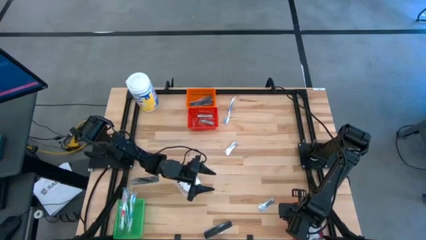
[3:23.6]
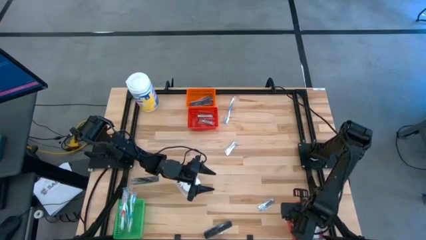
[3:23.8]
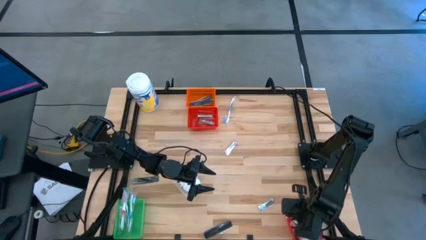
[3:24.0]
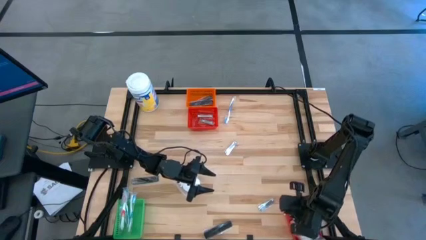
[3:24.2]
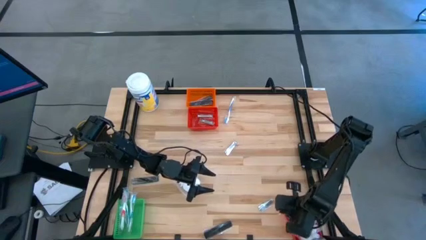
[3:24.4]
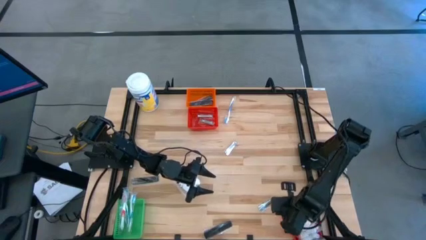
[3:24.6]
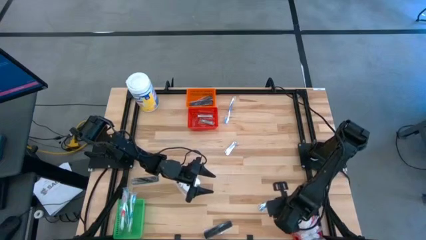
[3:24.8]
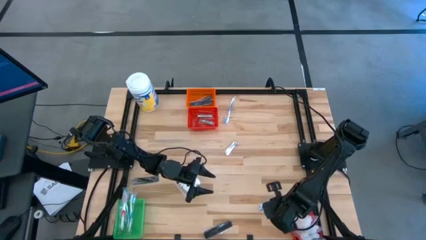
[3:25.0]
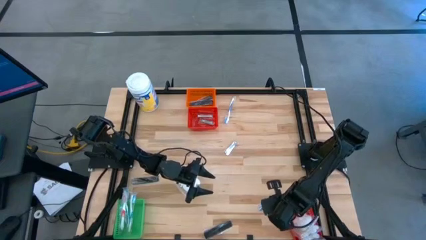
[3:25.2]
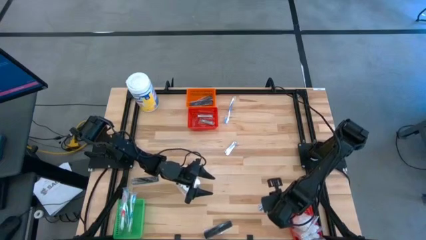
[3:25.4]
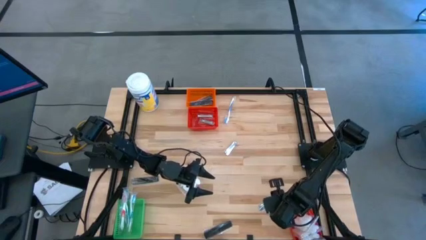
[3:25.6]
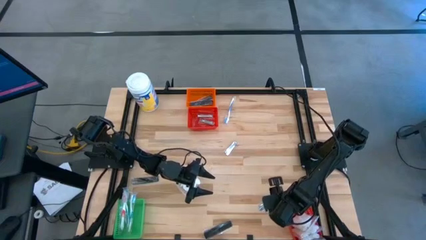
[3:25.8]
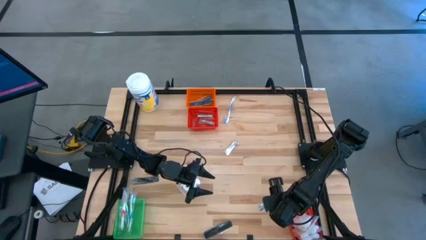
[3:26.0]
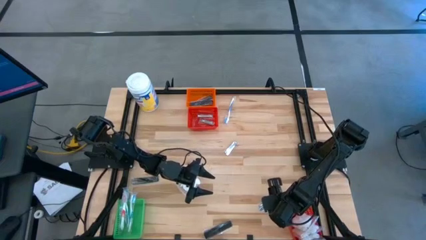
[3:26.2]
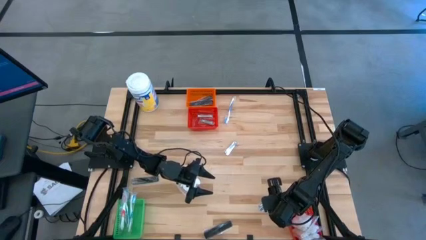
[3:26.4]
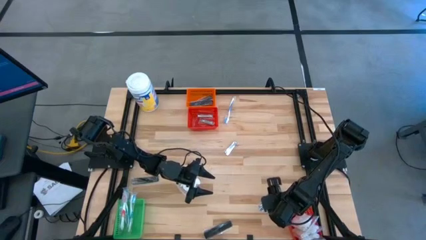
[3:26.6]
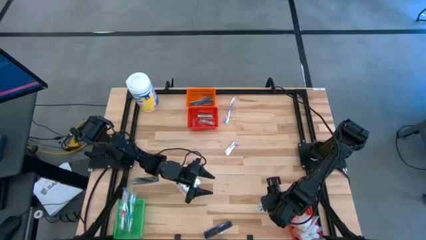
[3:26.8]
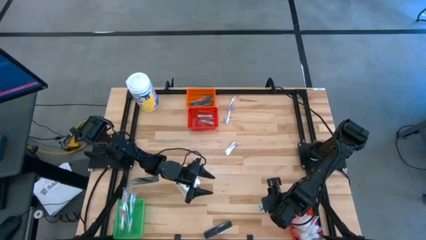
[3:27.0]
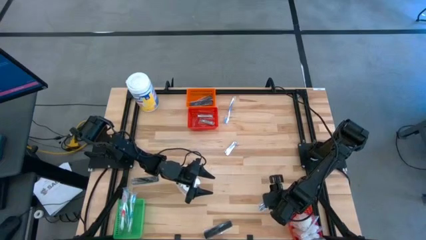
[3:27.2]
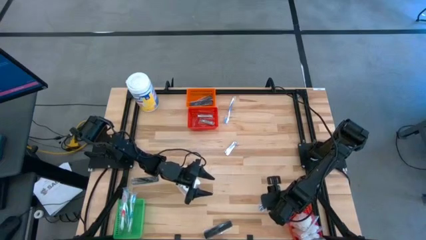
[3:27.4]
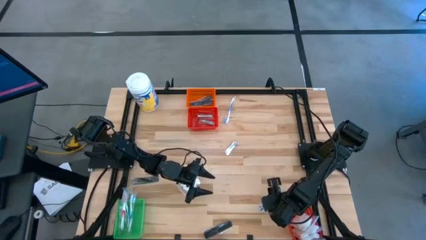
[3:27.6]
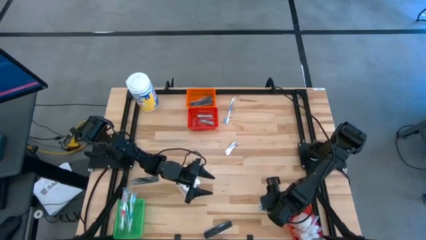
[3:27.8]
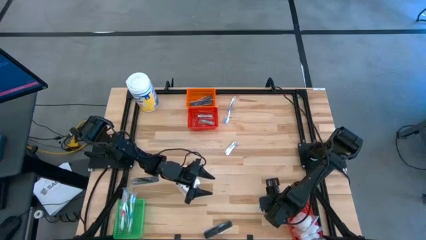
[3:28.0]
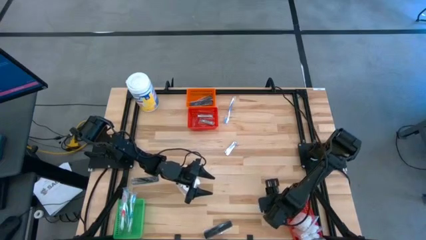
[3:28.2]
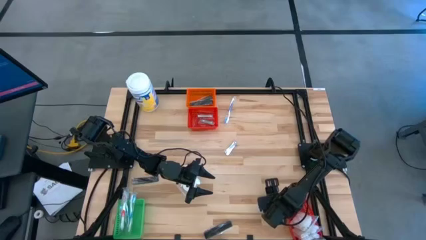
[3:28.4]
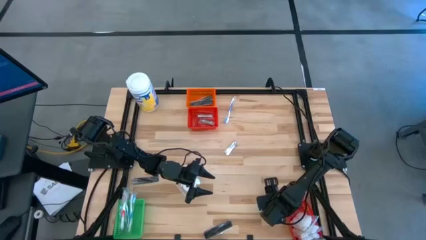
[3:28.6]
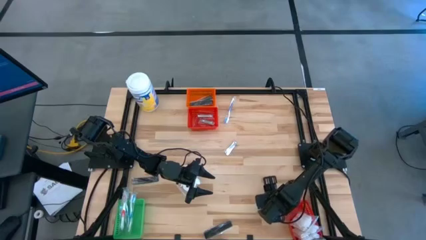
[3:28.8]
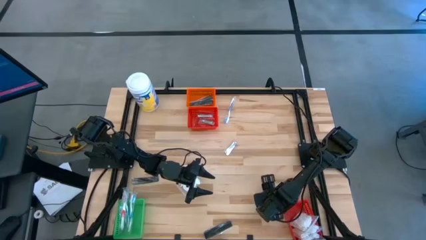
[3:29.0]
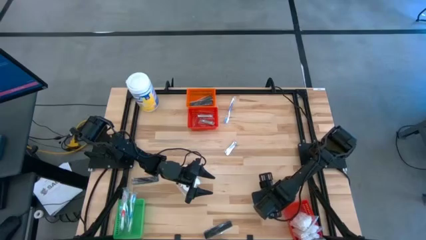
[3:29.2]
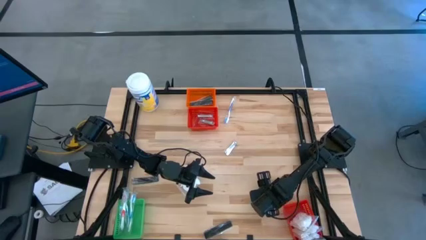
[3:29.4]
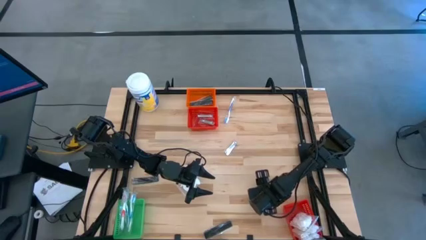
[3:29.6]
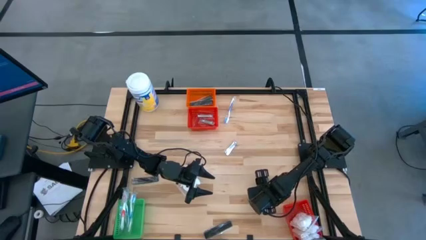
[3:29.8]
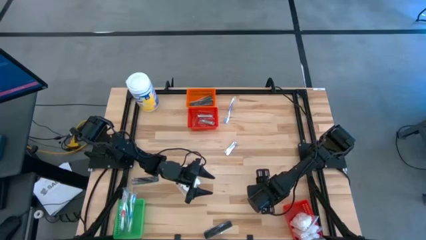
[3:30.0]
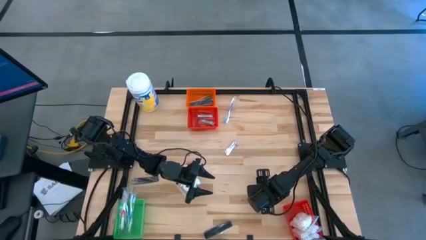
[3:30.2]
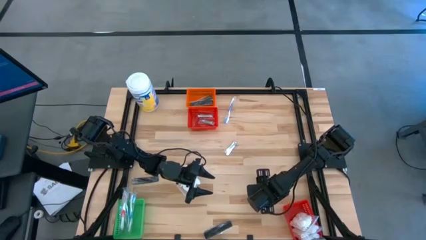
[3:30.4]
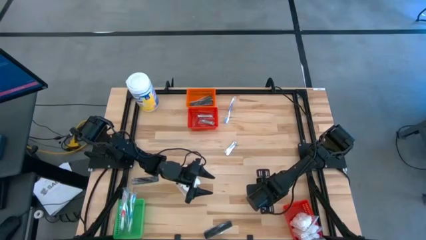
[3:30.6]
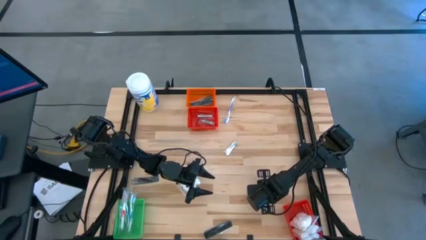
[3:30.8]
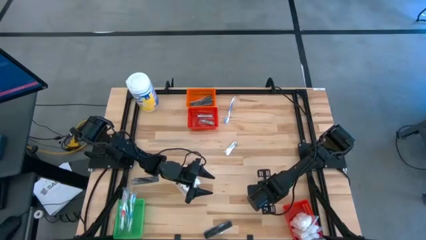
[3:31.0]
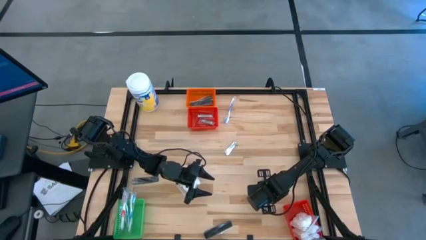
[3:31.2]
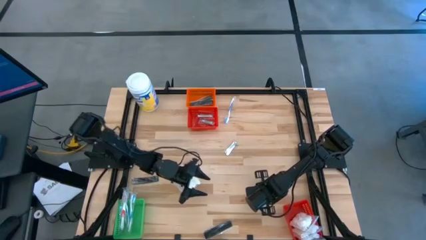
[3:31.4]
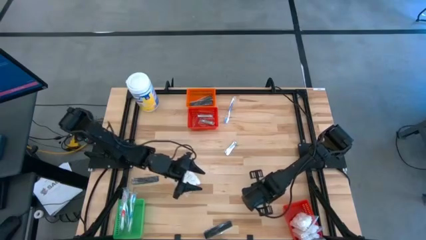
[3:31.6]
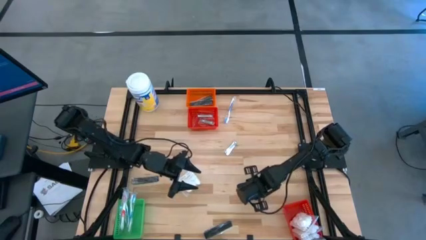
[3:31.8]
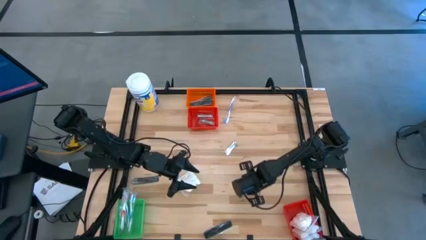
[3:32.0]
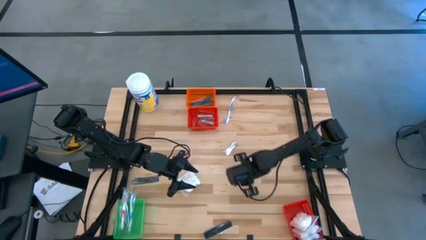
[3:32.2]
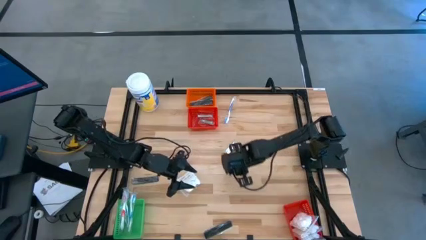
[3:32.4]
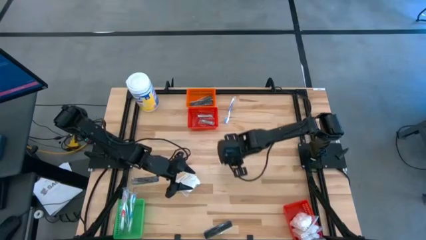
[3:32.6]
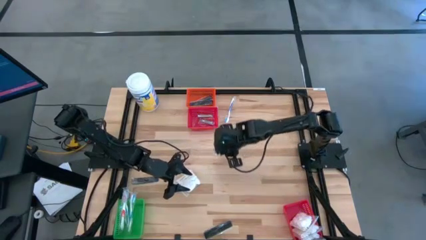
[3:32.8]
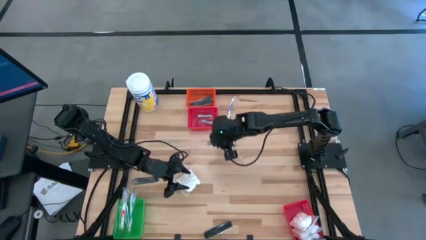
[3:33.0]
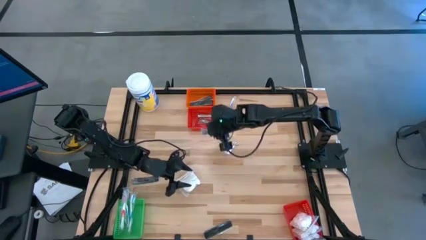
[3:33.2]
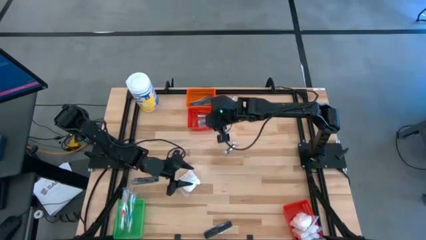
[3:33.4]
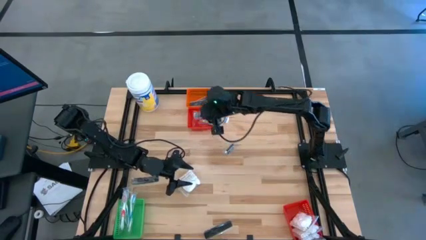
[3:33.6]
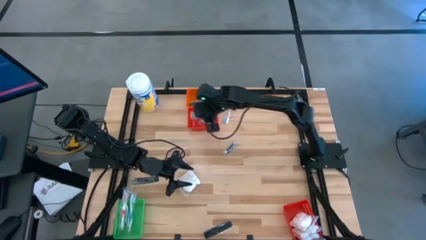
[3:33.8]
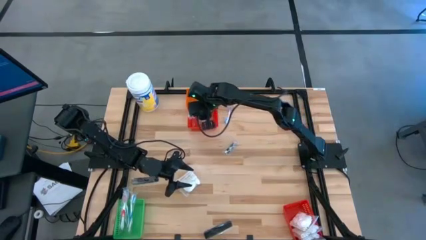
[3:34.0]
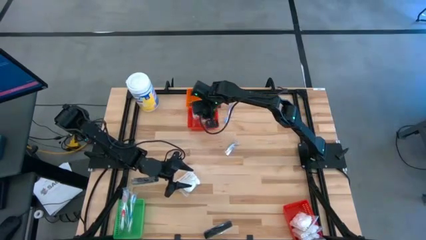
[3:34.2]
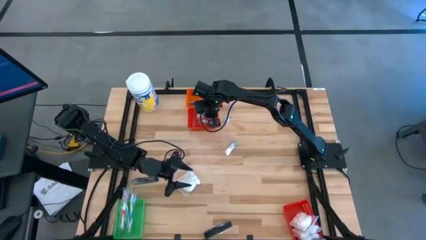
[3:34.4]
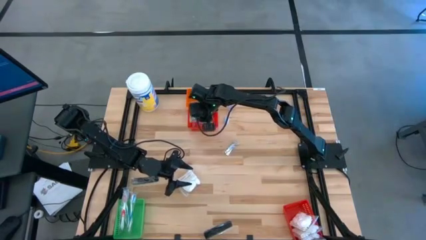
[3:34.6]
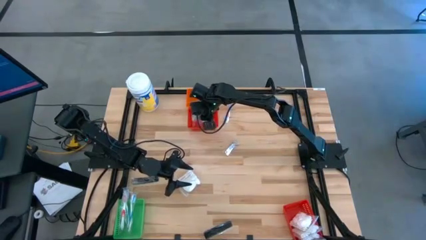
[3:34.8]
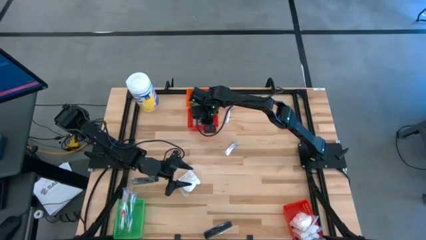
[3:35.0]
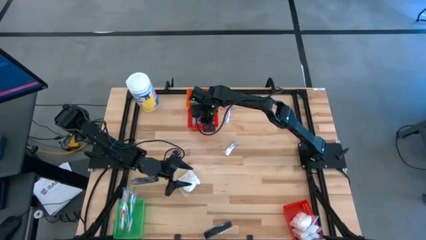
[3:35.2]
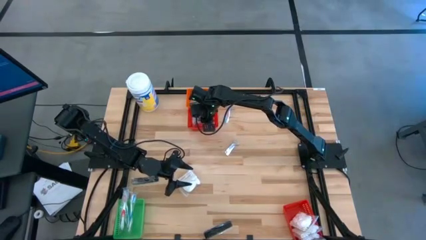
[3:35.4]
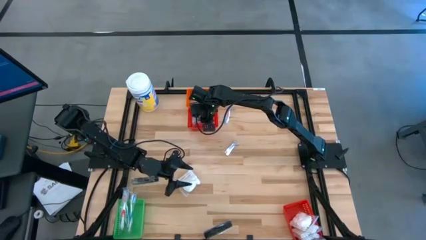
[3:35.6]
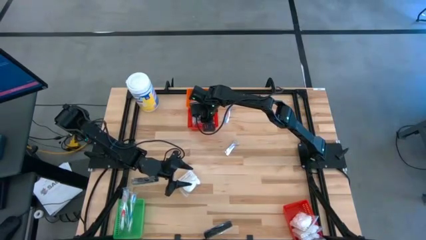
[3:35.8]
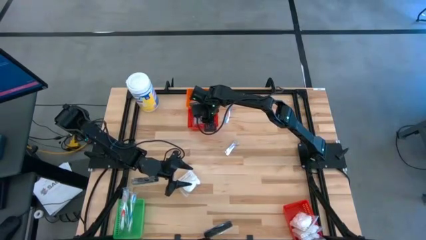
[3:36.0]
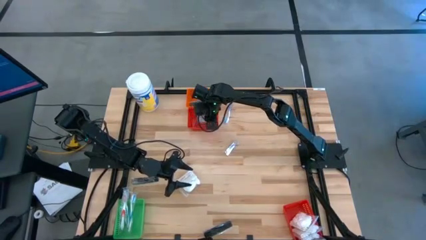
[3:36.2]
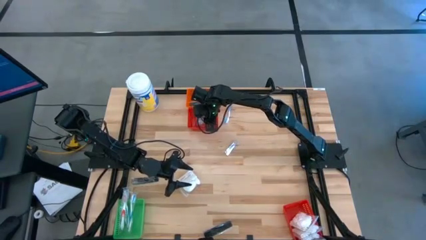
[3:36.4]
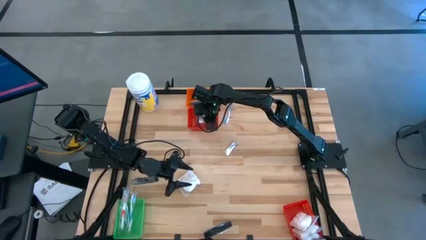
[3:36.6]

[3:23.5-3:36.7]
Task: Pick & Place Travel size toiletries
Put the nail cutter into the top red basket

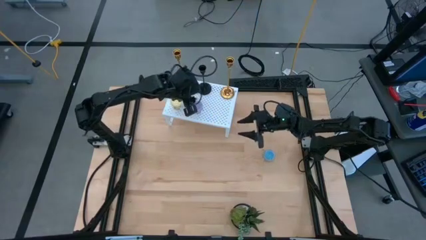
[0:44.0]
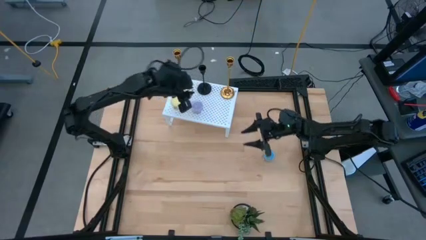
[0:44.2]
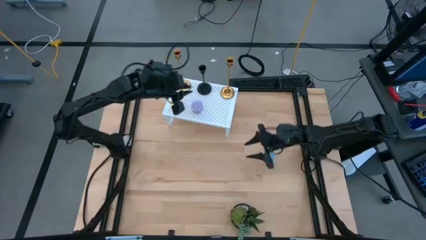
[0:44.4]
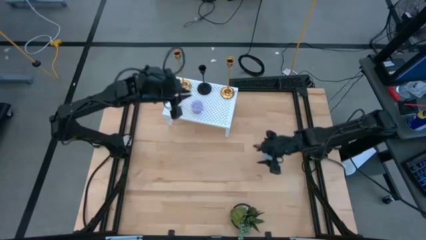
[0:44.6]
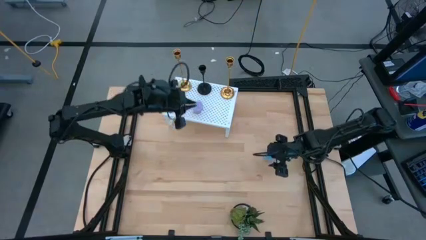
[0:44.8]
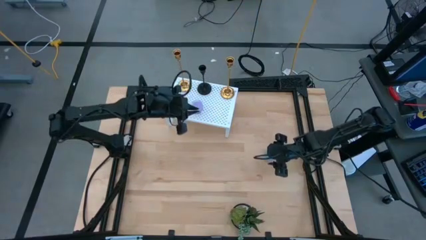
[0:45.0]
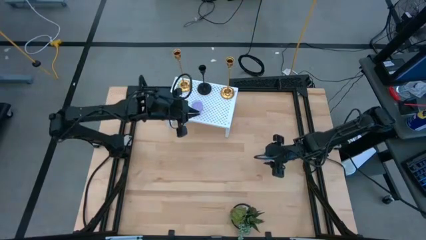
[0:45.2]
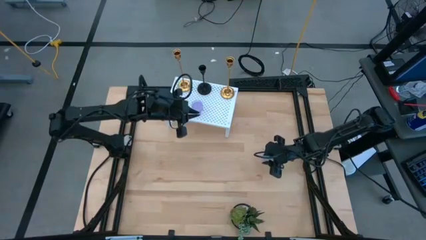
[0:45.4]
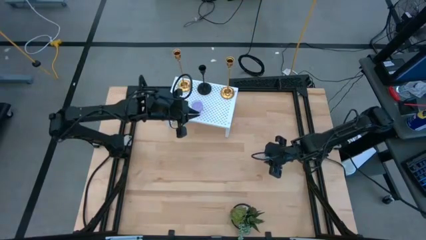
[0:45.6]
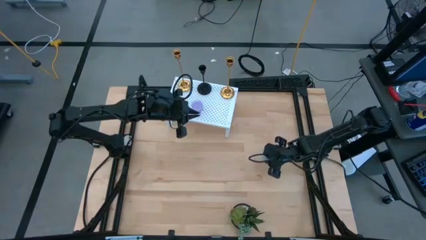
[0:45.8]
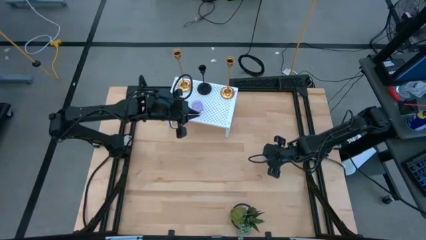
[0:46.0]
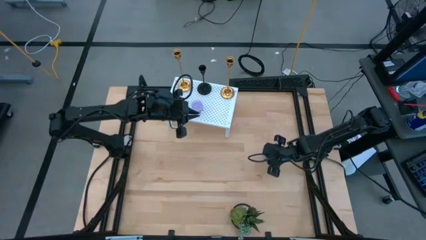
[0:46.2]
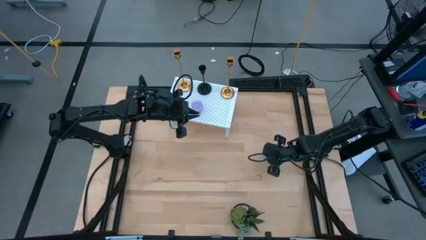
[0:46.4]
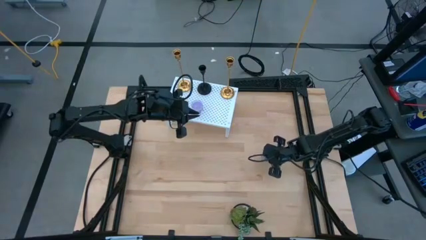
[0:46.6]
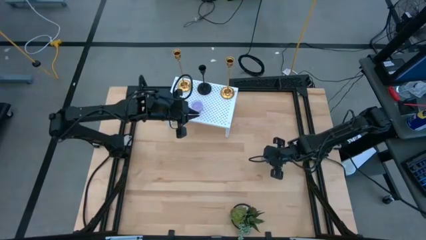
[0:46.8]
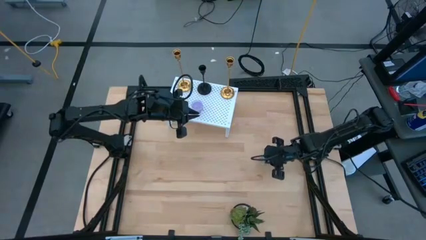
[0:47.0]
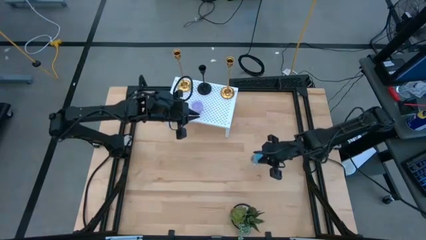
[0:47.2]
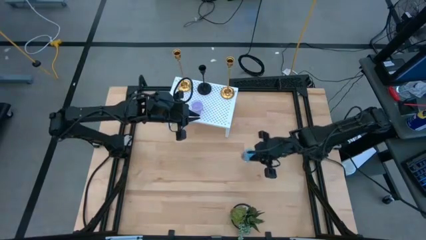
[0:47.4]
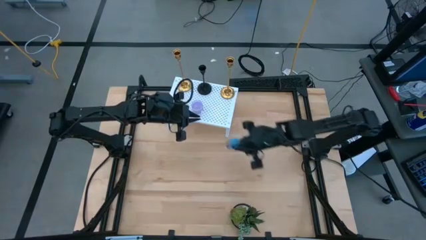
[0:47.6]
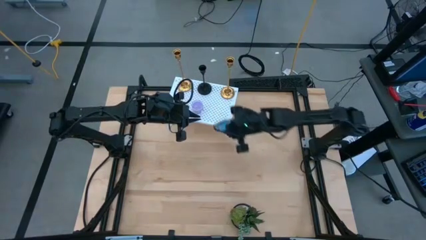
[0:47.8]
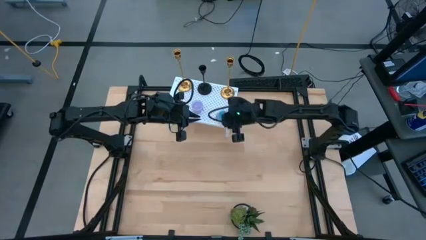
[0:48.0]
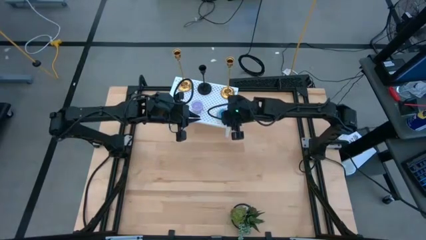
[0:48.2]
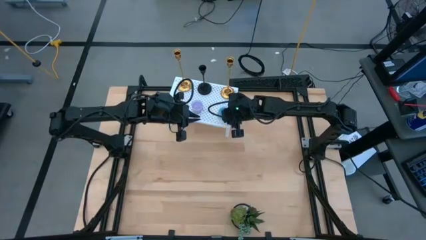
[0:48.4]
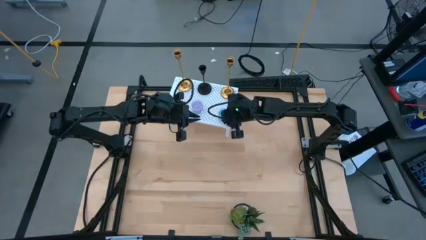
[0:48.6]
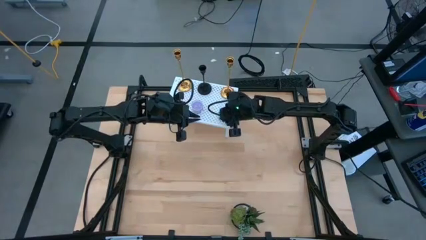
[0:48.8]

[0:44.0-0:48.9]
Task: Pick & Place candle stick holders
Put the blue scented candle on the shelf
